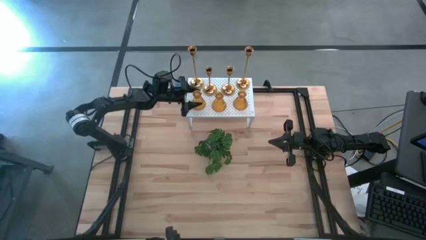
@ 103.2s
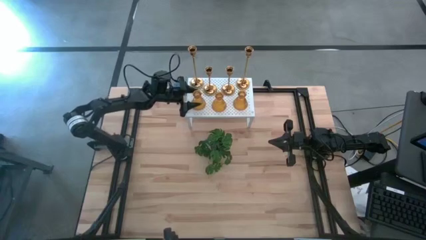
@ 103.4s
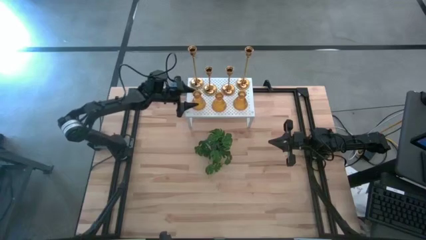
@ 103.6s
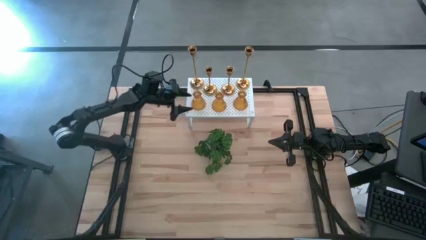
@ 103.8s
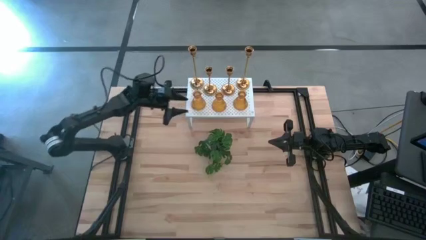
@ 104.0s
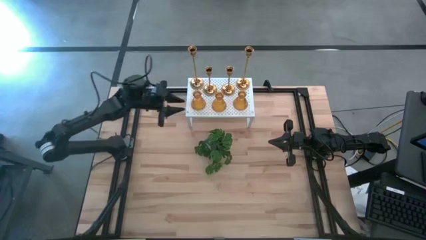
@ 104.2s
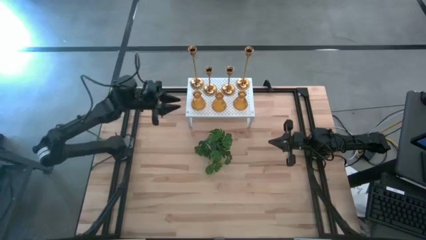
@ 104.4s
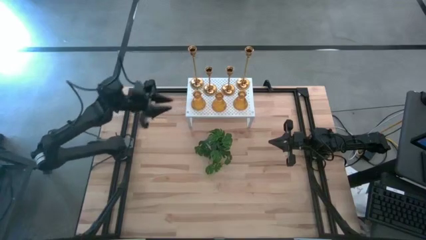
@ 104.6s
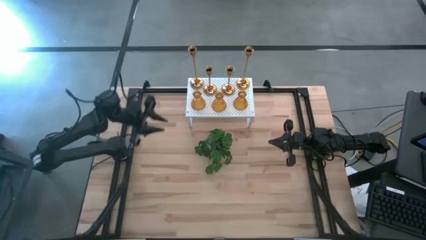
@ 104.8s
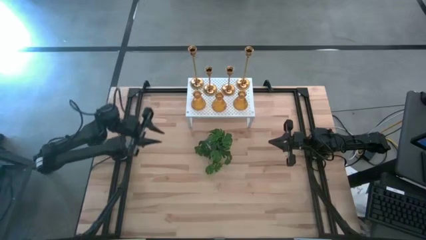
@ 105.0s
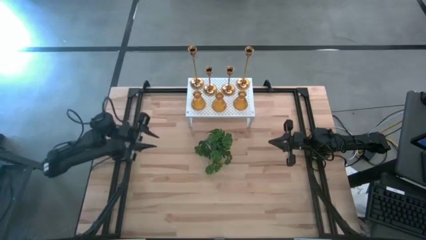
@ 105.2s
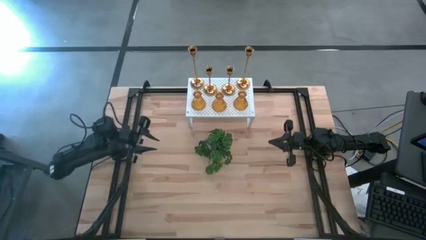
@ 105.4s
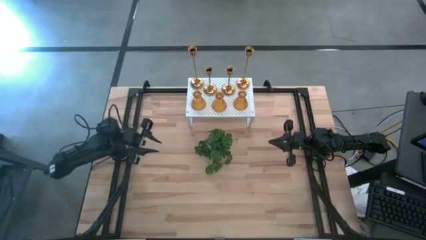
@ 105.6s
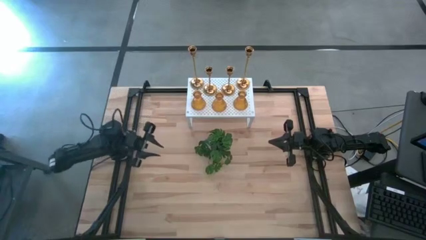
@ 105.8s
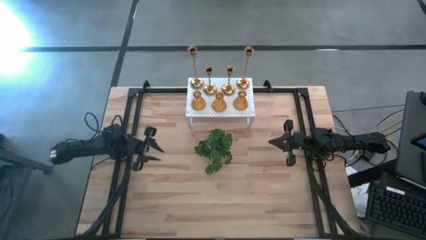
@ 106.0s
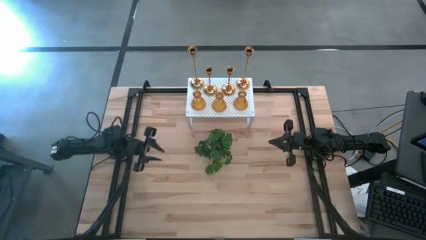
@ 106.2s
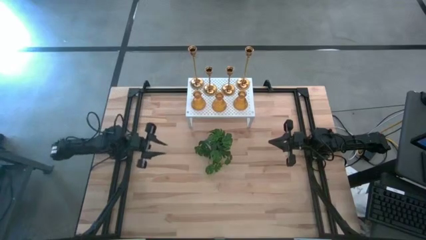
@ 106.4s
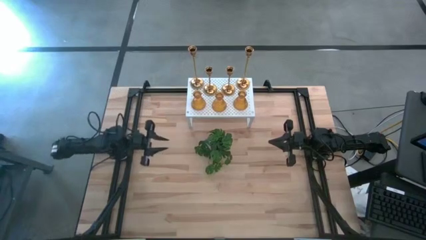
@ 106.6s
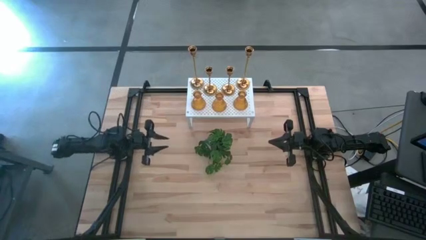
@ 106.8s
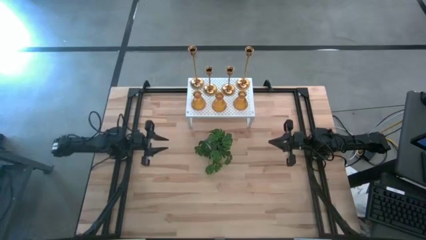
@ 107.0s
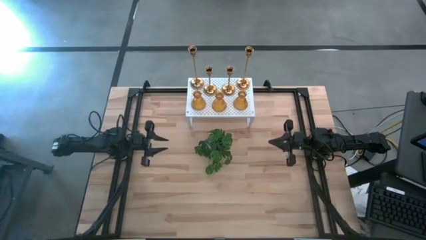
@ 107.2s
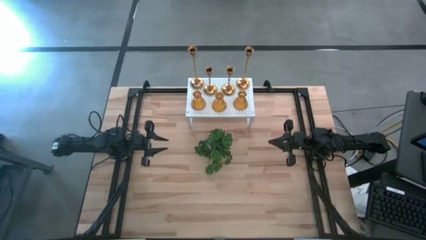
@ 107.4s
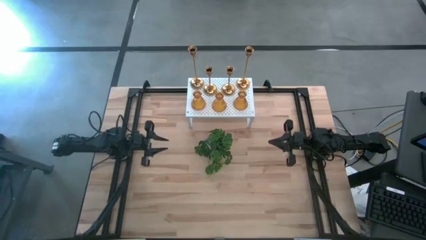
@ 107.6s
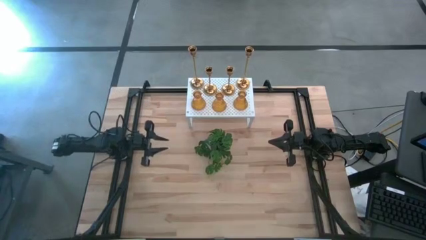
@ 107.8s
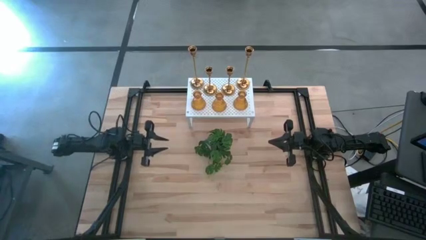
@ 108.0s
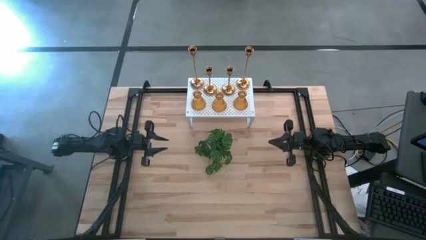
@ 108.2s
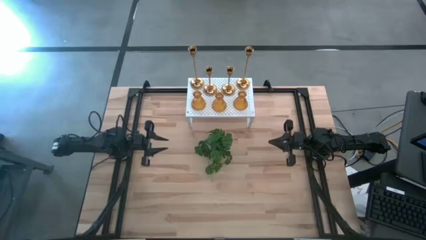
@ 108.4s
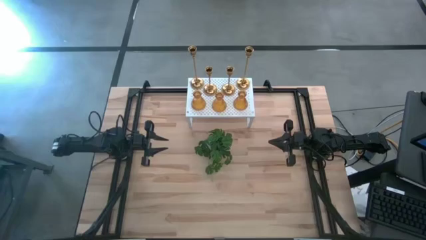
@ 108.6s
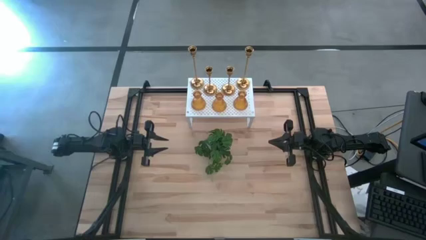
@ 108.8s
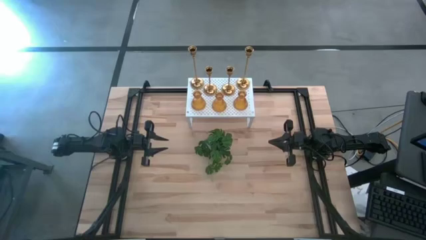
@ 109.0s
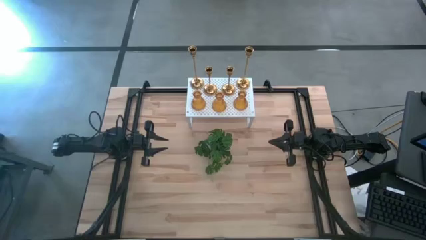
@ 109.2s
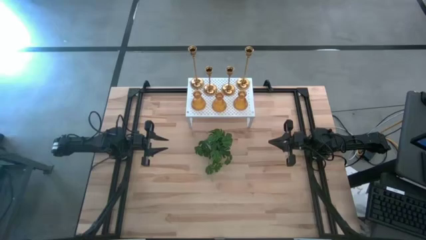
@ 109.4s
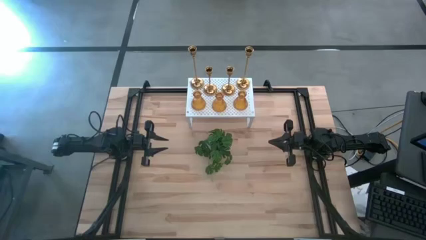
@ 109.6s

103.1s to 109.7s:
Task: Pick & Place candle stick holders
Return to Home Position
